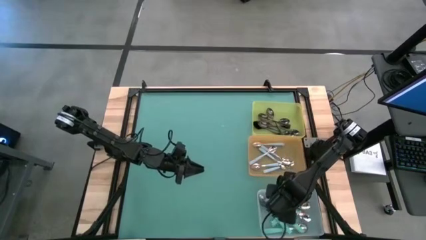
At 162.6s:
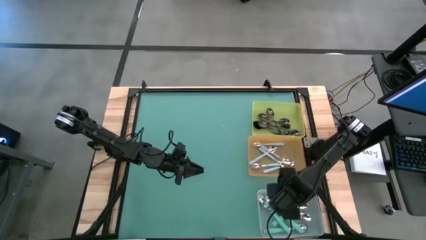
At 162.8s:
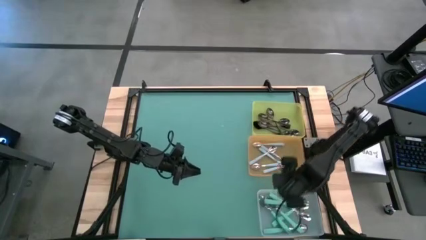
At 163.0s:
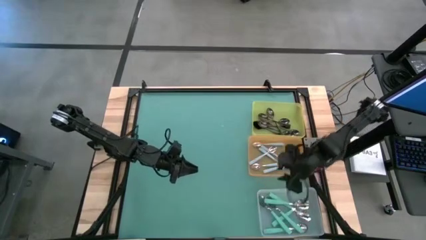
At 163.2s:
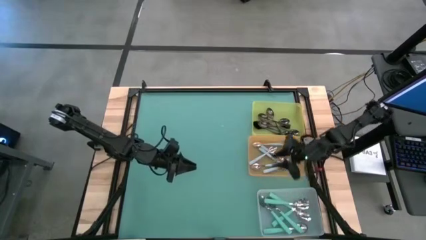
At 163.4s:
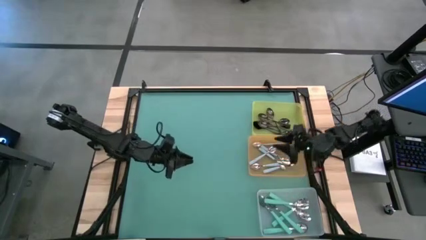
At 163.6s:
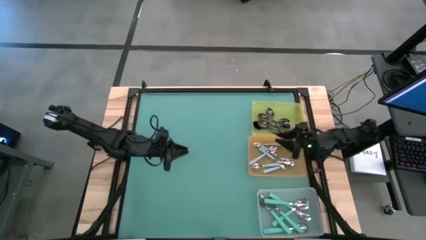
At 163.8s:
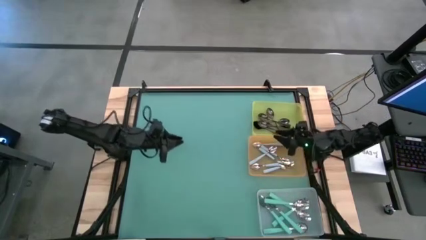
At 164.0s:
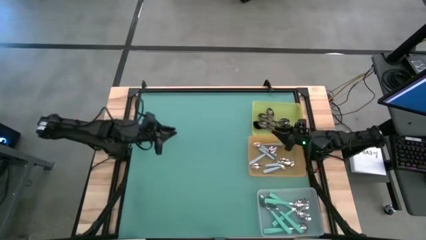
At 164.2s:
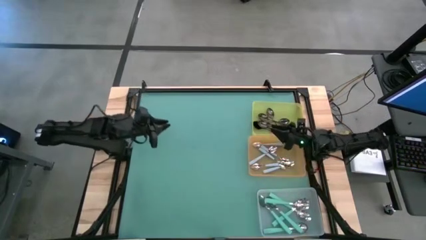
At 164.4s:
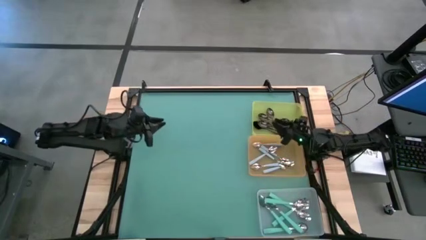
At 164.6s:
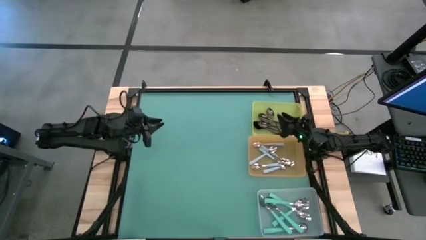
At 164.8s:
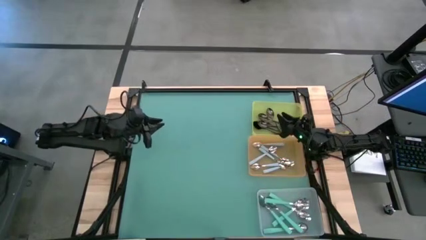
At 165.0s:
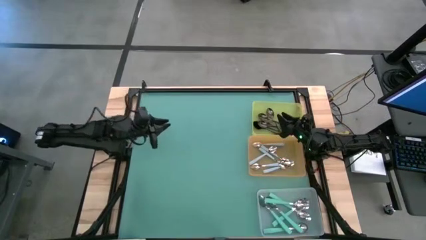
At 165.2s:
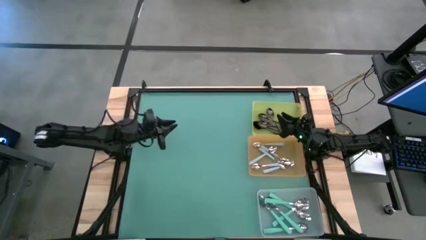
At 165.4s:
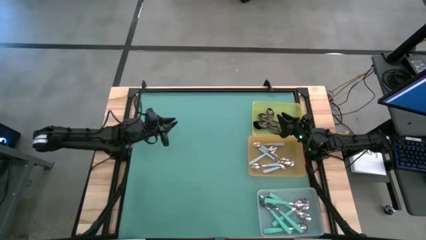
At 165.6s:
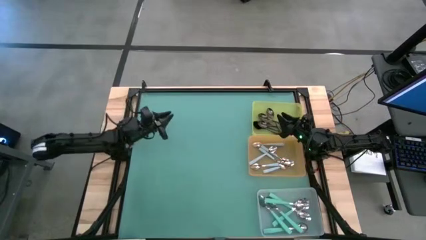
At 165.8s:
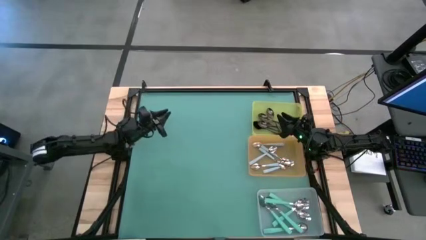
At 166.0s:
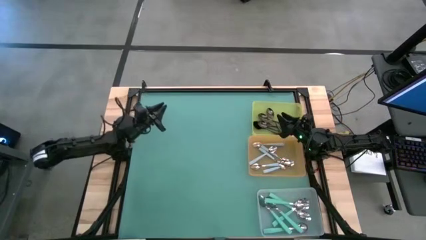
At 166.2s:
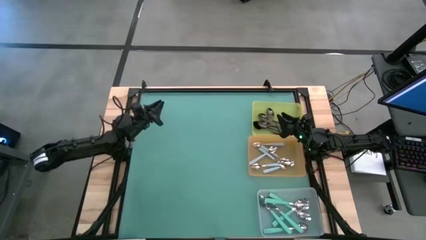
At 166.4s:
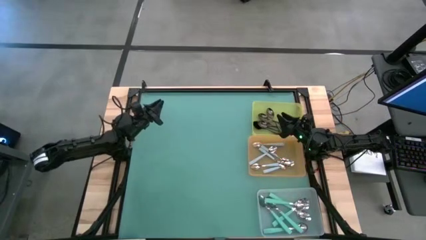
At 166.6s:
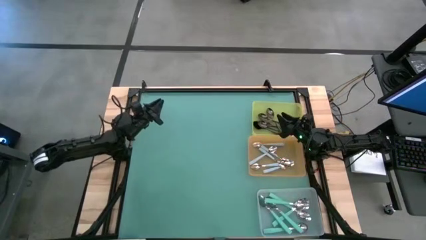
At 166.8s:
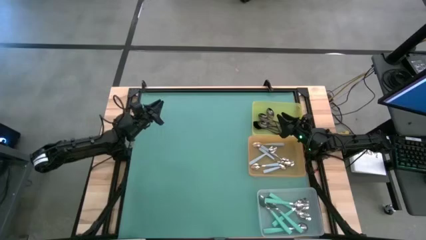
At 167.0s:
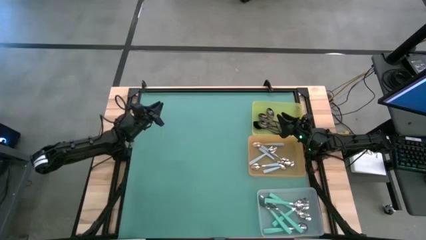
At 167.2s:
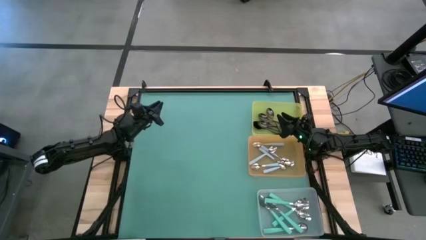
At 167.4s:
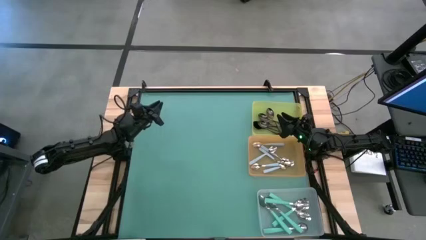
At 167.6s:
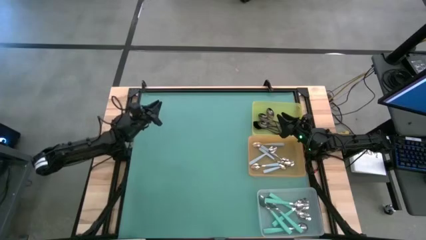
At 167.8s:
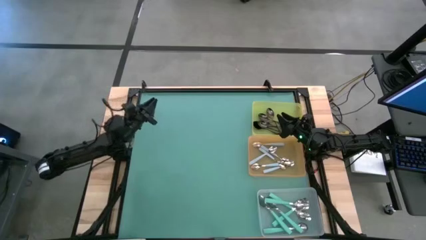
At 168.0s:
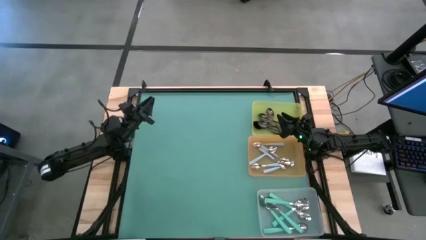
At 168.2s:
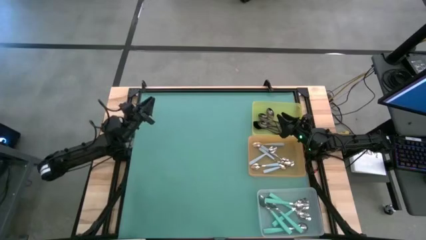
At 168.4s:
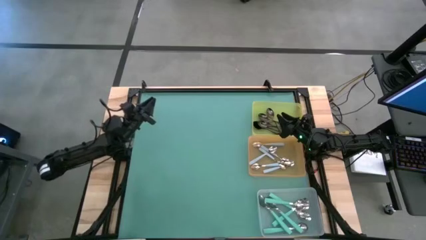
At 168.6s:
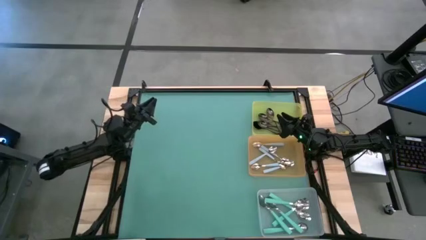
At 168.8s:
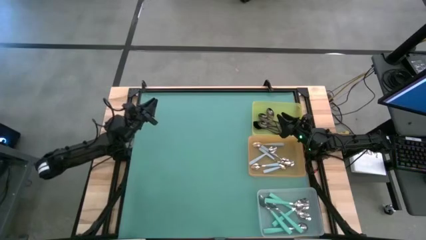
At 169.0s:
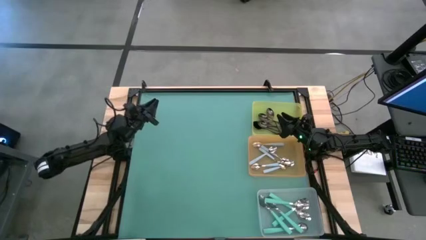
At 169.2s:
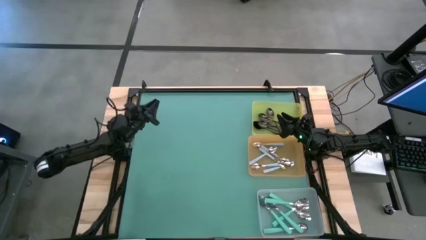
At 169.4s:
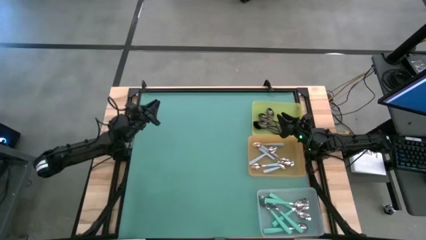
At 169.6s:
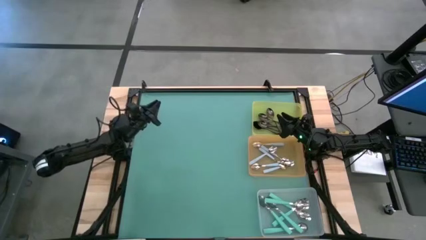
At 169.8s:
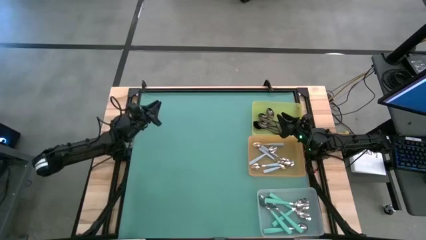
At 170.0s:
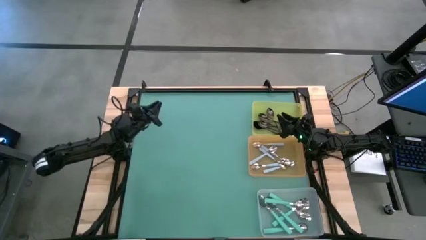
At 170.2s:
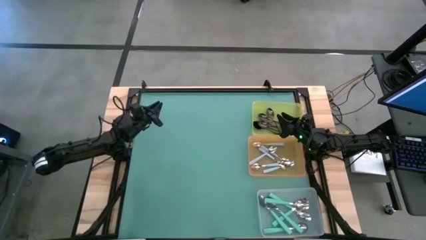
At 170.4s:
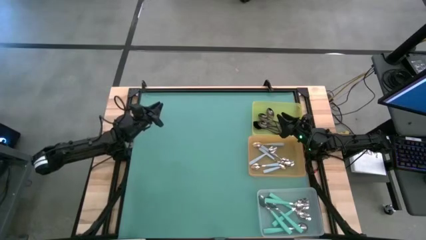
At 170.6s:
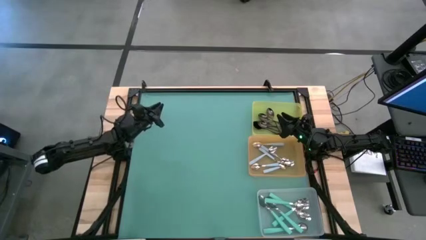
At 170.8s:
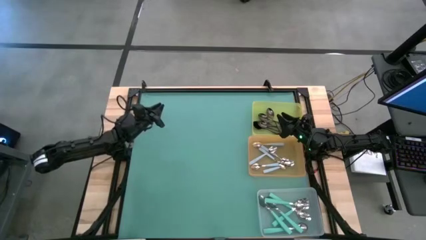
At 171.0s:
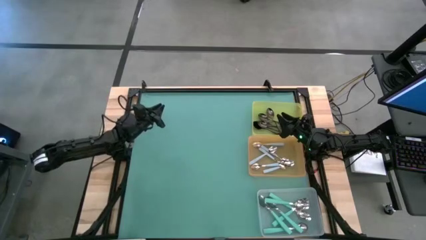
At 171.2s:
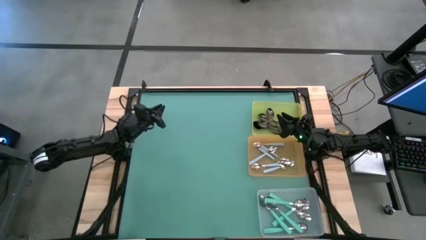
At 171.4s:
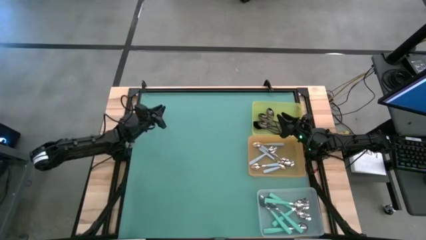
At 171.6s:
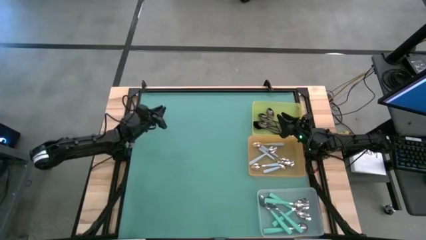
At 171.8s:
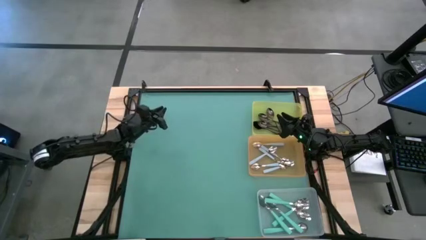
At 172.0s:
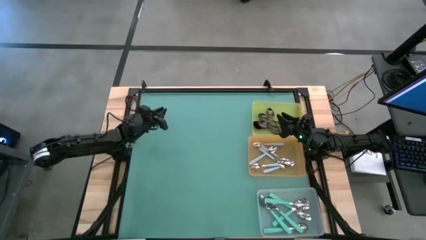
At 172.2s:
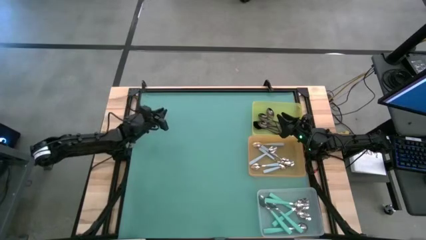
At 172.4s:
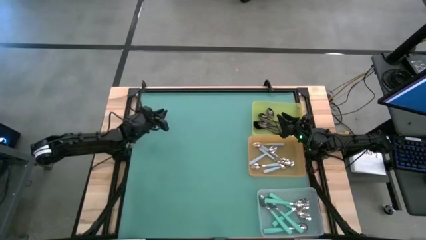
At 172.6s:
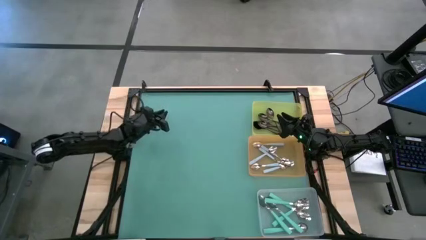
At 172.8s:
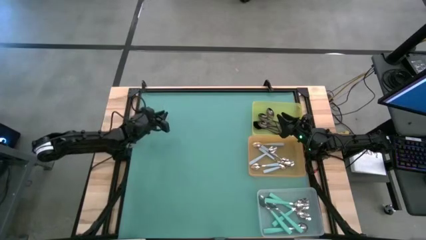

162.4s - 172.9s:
Task: Sort silverware by color (type)
Return to Home Position

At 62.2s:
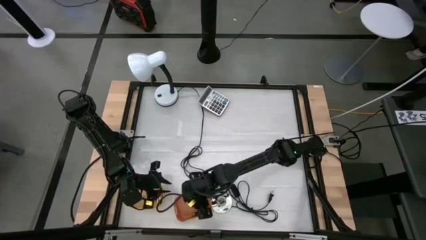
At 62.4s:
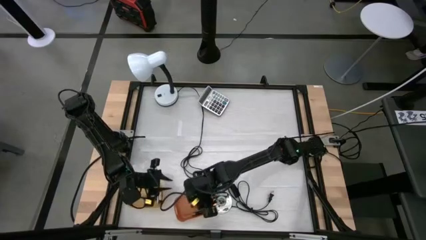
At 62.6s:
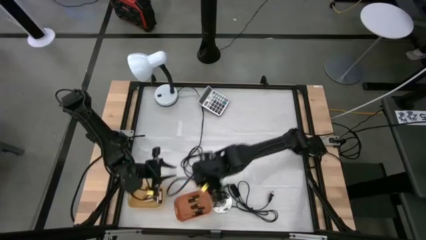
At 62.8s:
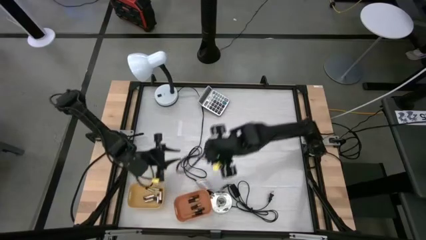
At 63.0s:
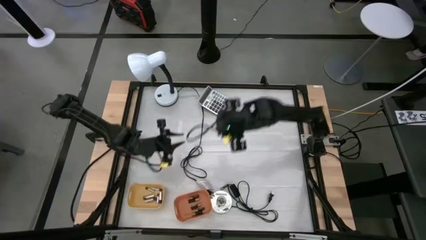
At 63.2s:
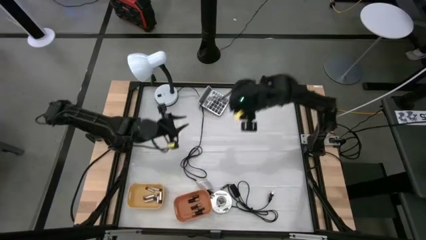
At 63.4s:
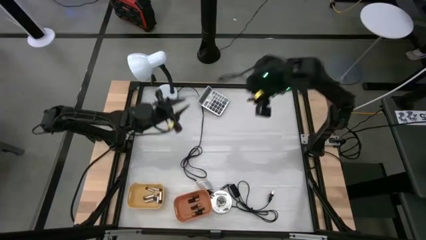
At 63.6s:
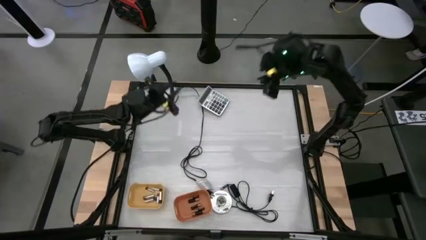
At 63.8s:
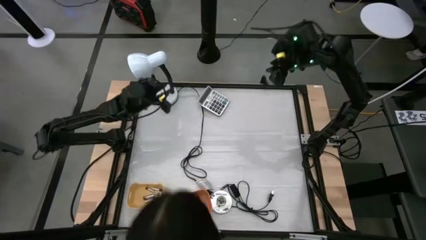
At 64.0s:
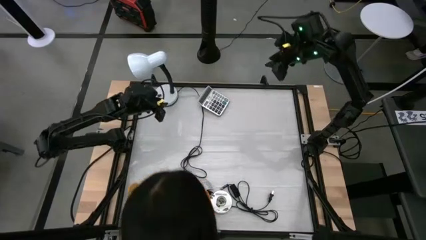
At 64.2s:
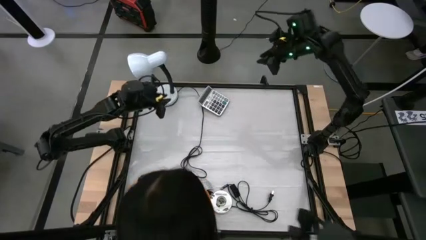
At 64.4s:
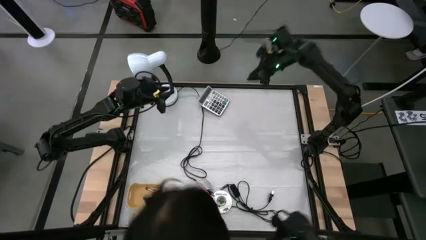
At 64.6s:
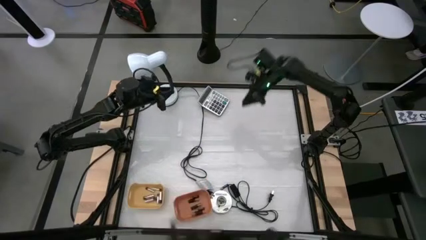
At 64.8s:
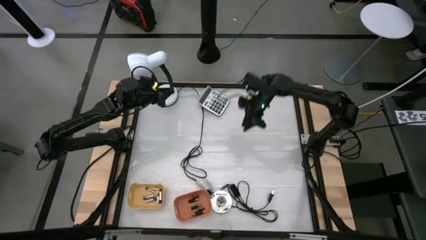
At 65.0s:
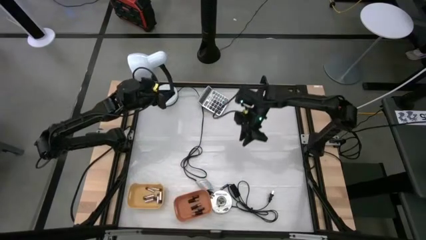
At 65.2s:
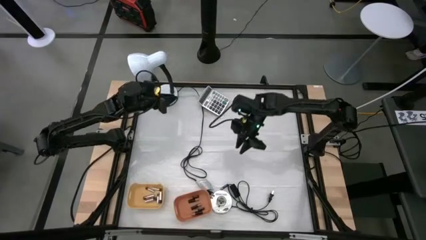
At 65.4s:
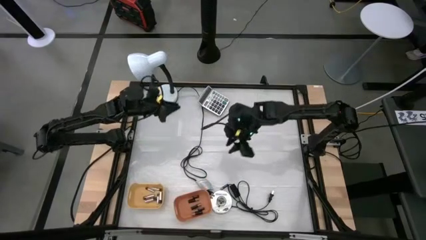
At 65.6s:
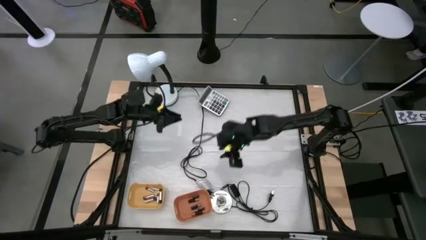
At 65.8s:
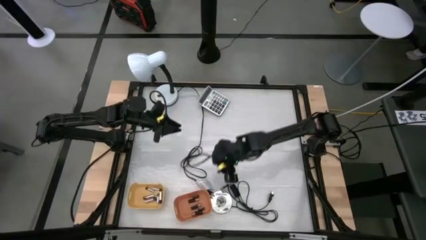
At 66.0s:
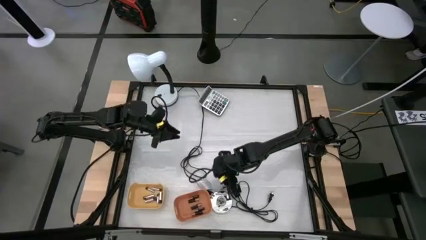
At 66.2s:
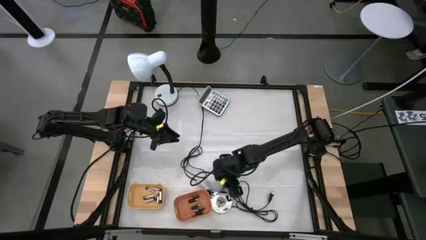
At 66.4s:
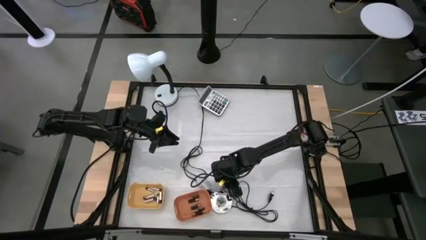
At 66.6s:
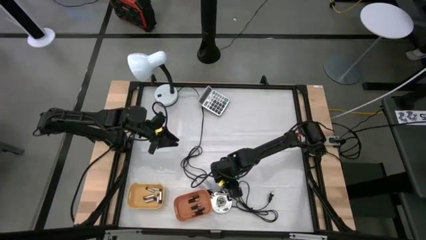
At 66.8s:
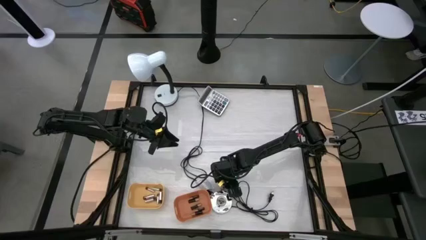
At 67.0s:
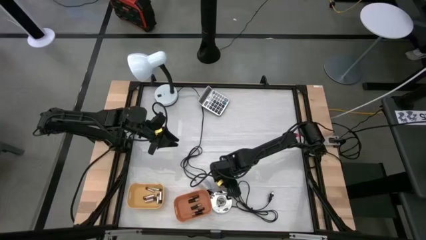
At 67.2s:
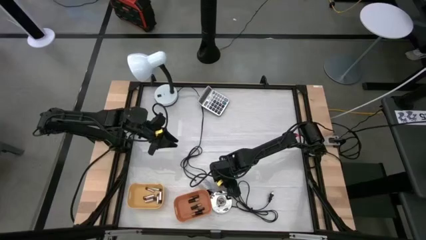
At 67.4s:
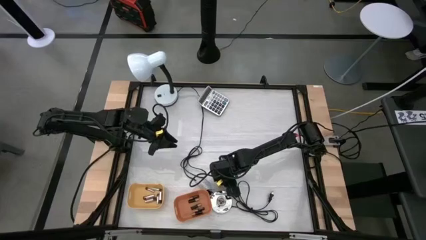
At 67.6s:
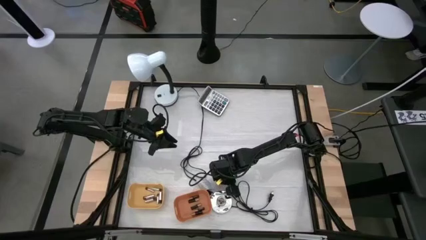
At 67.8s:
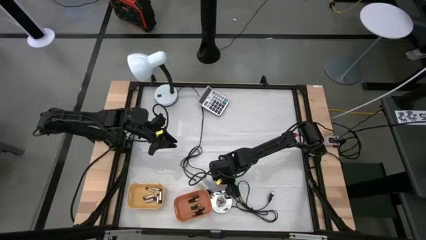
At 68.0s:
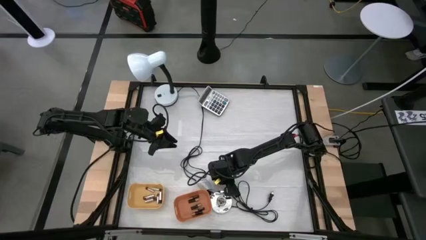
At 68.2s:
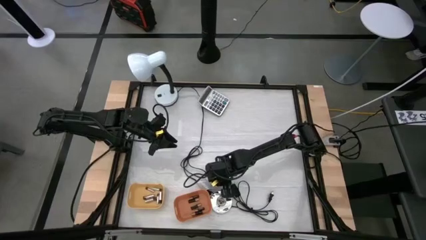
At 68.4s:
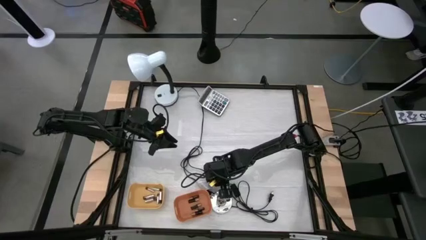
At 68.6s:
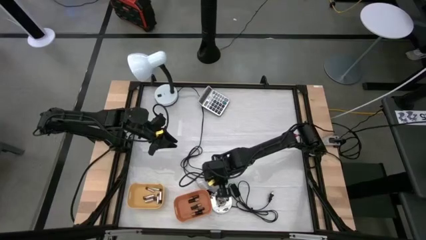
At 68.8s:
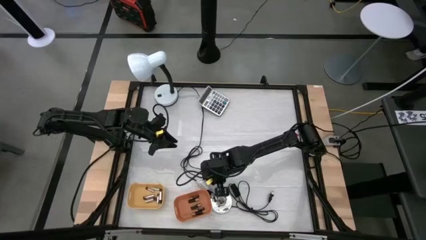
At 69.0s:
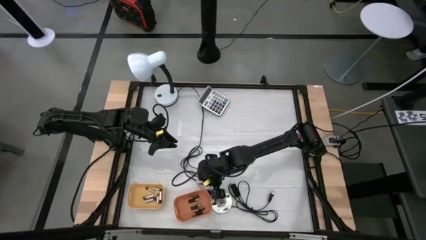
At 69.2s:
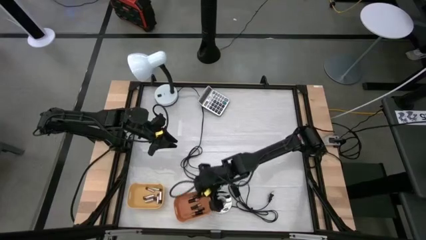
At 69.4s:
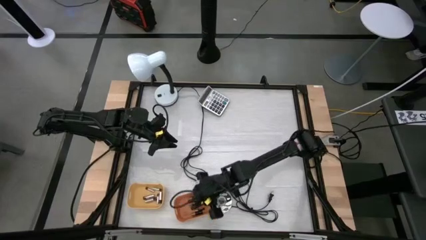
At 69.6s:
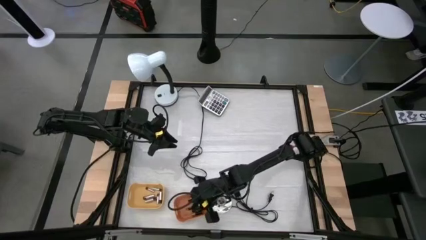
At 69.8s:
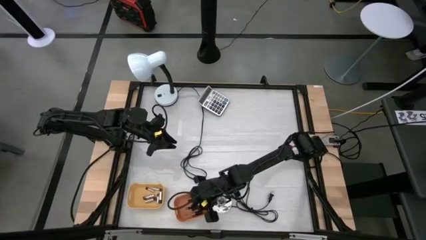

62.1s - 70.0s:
Task: Sort batteries
Put the black battery into the orange bin
